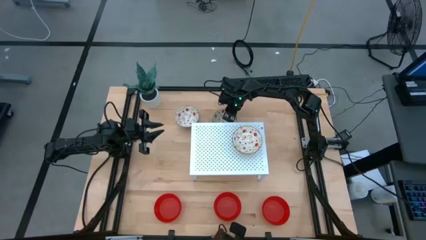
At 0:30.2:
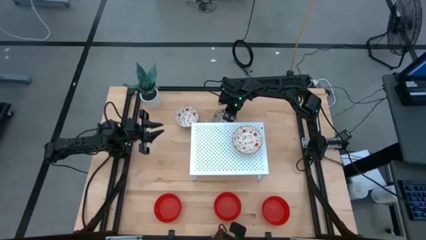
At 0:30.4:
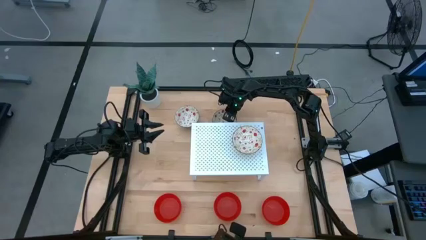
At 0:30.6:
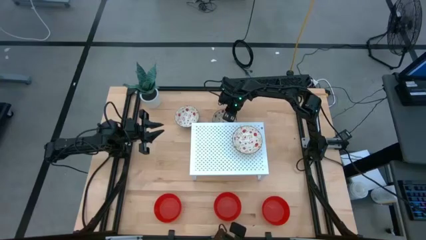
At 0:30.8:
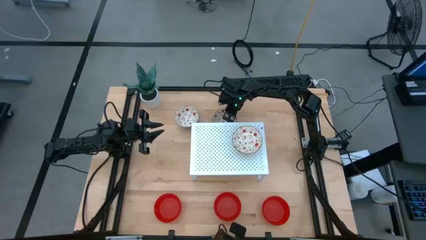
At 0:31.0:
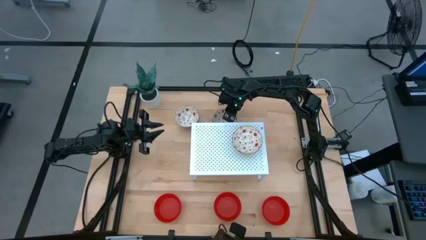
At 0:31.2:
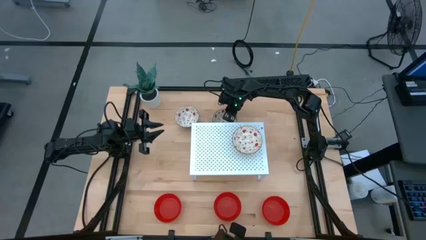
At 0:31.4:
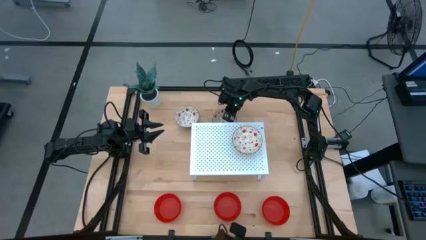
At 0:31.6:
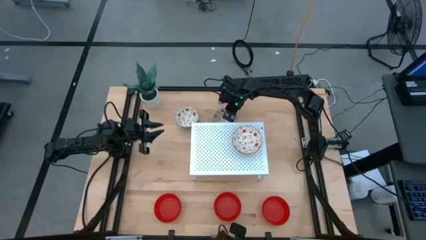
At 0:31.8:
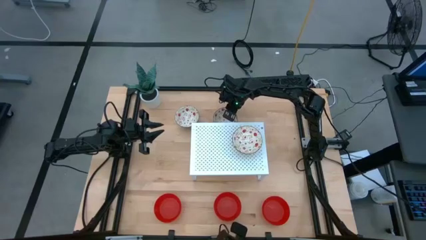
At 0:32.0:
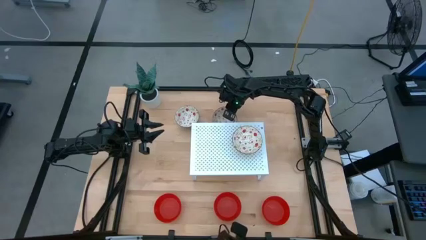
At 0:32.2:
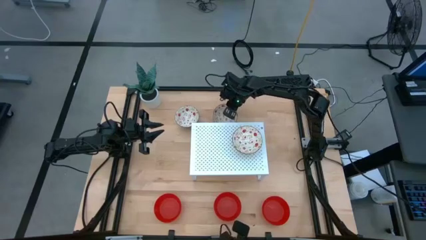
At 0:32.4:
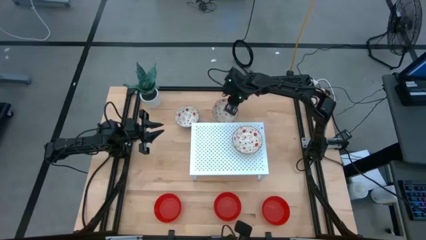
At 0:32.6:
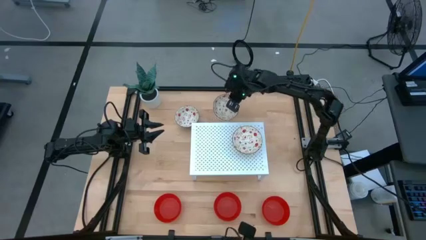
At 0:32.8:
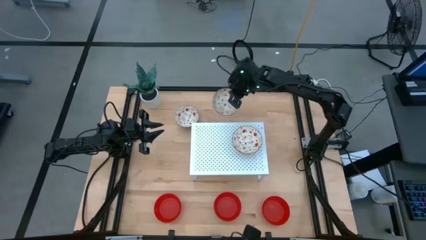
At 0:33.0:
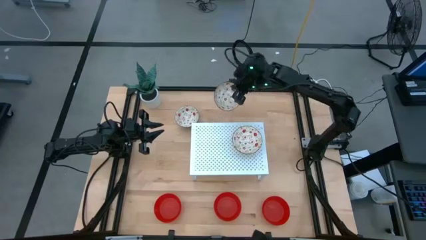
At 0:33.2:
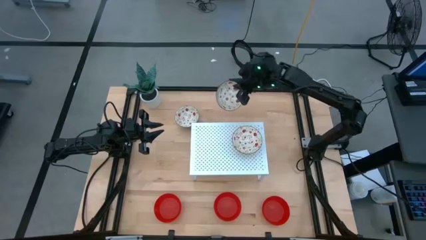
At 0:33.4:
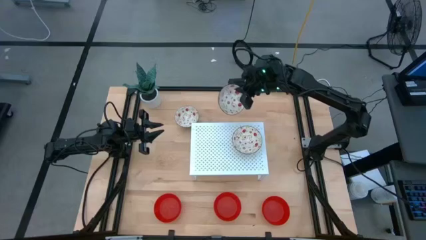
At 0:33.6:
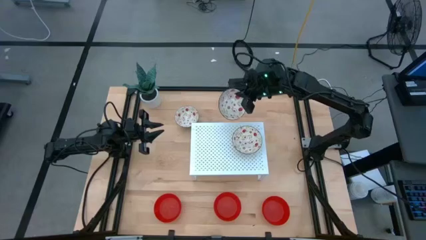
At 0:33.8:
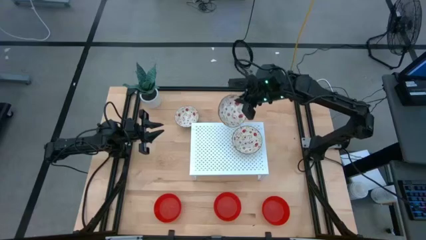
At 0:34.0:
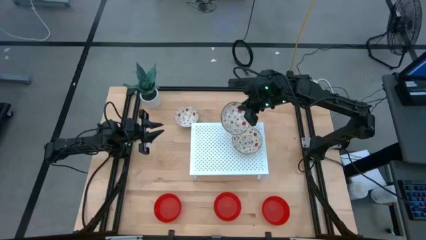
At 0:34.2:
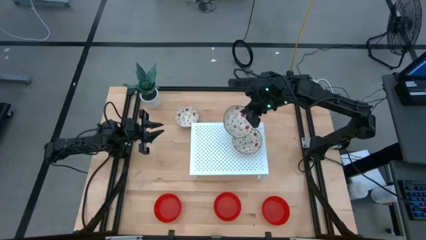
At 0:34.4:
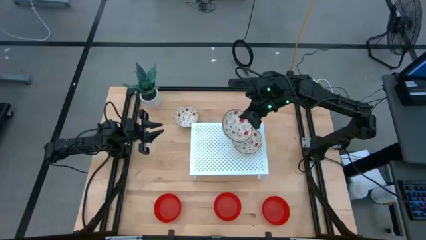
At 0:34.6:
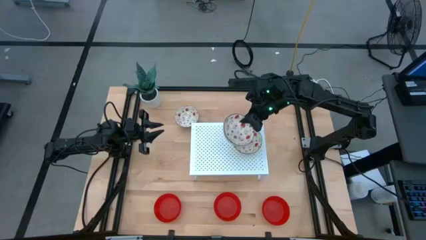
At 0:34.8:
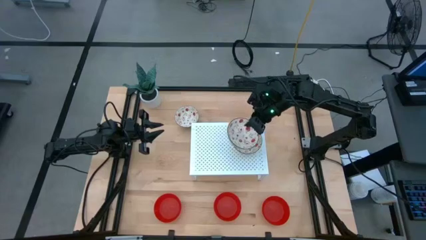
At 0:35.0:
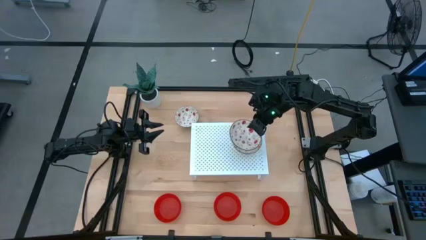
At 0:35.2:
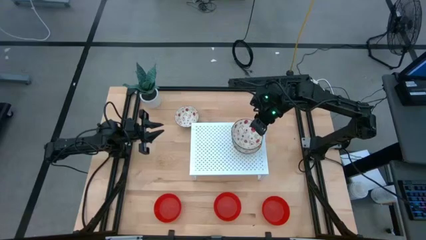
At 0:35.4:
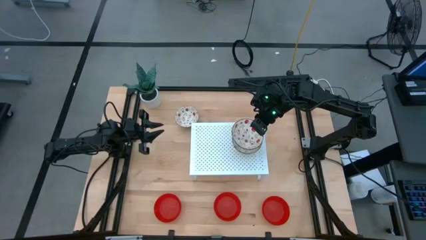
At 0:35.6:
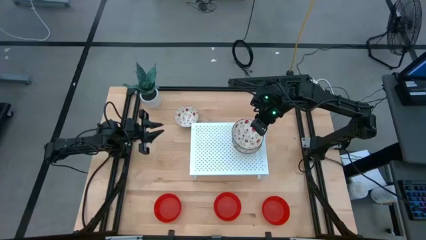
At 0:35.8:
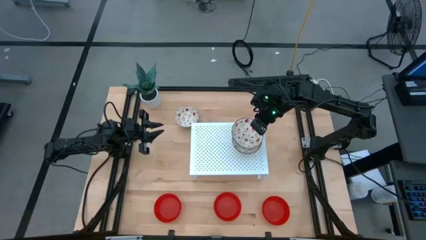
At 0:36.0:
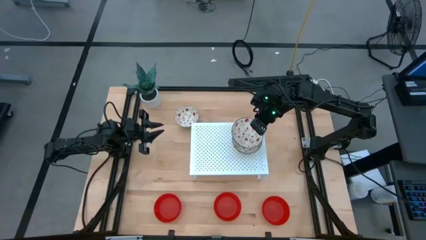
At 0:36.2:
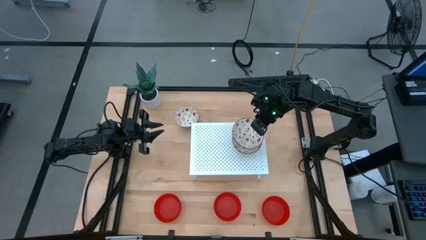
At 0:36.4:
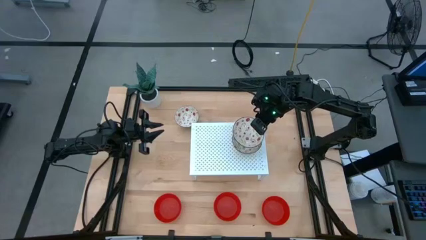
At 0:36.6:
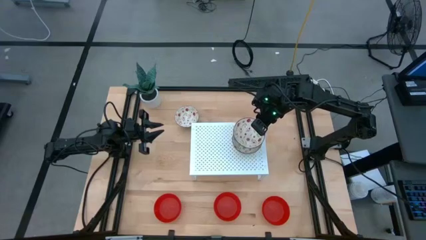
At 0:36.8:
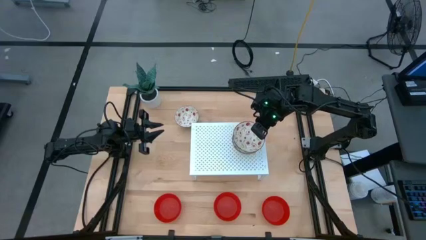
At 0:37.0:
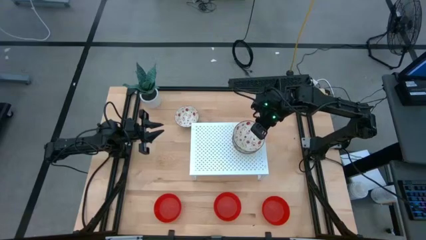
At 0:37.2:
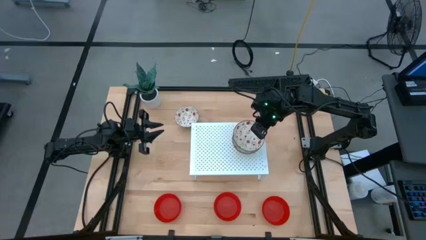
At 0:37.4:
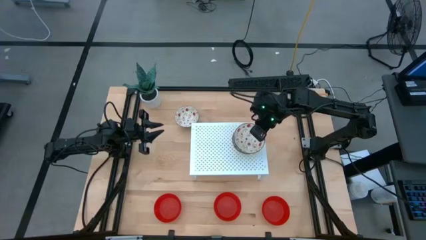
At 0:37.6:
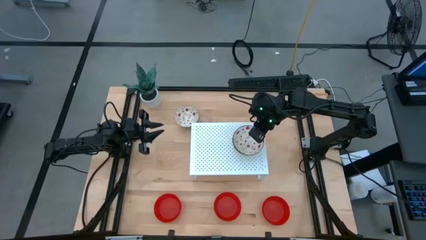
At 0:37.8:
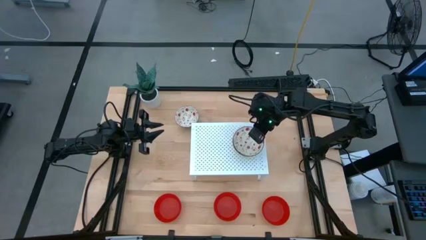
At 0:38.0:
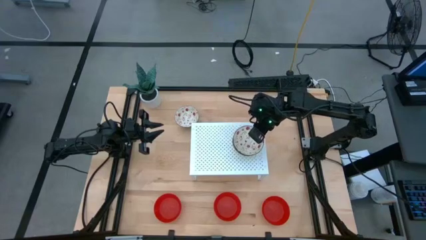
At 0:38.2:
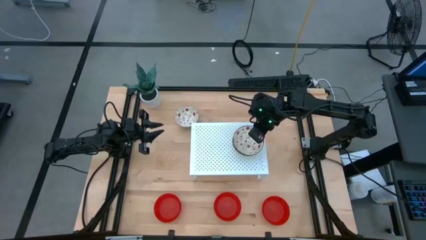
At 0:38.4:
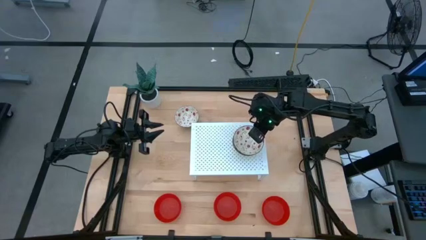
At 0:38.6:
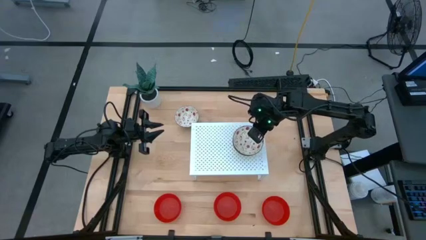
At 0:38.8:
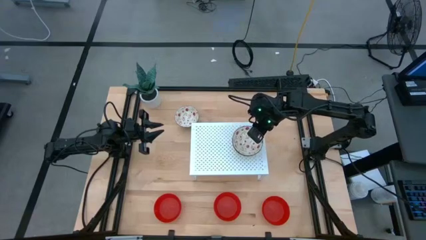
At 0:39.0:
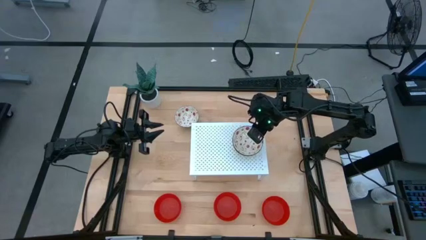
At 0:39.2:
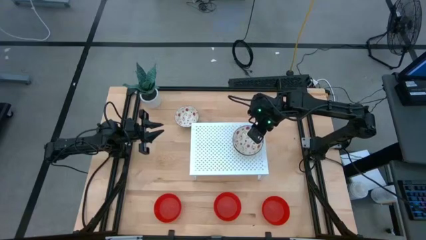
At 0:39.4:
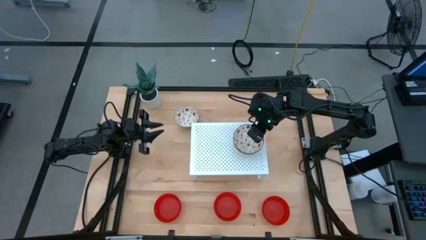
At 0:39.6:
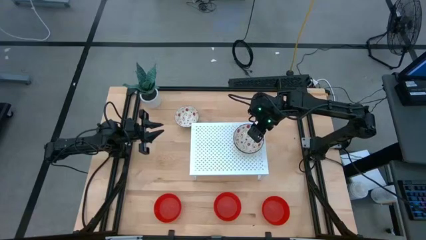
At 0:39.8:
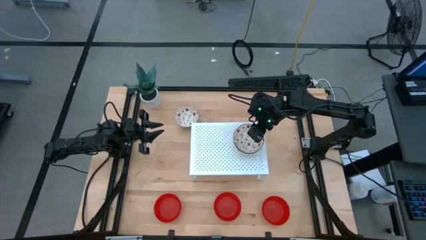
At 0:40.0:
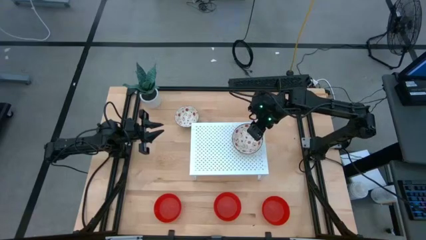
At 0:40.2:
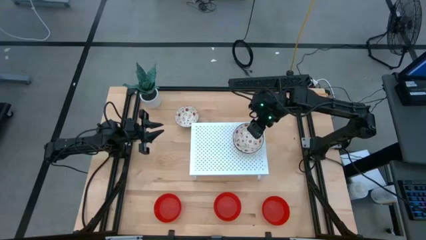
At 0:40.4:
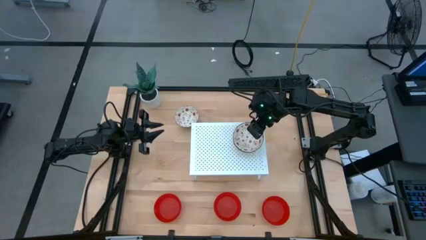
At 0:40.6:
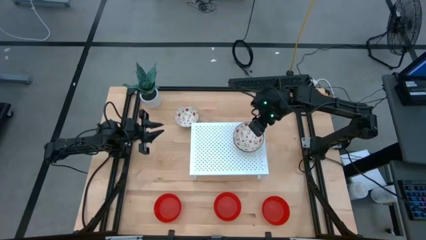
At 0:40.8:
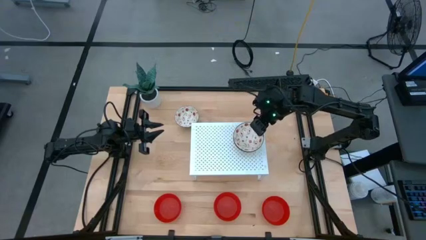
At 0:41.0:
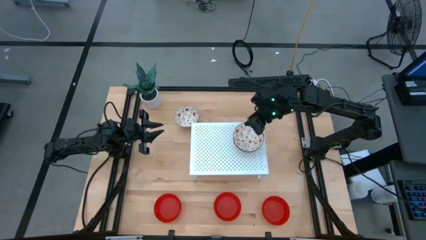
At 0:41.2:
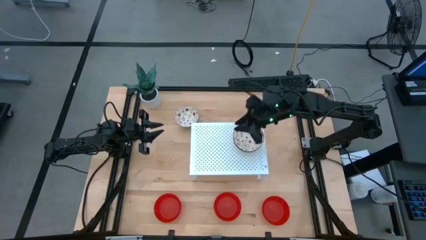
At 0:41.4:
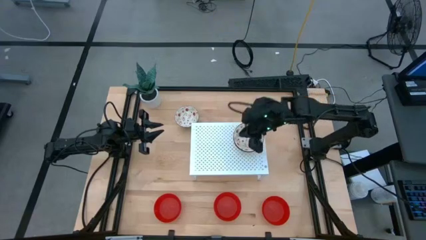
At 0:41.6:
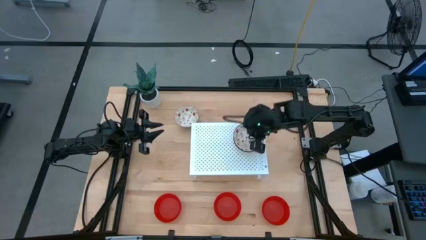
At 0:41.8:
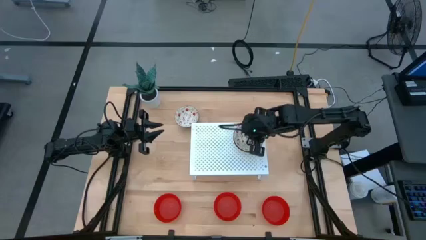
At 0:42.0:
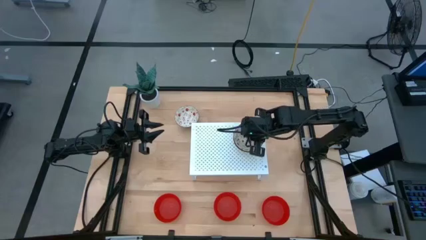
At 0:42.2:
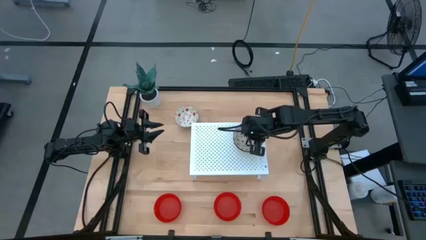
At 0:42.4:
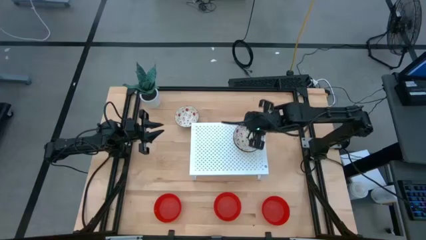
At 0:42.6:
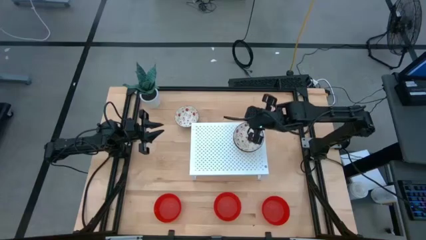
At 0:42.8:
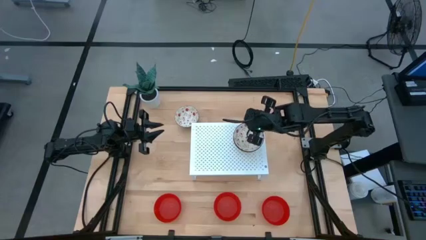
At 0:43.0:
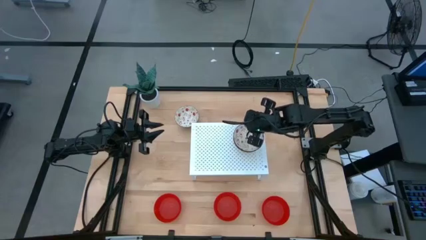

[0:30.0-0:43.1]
Task: Pick & Place Mini bowls
Stack the right white patterned bowl on top of the white patterned bowl on the shelf
